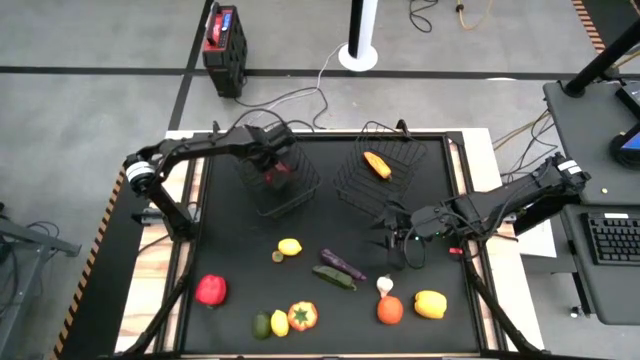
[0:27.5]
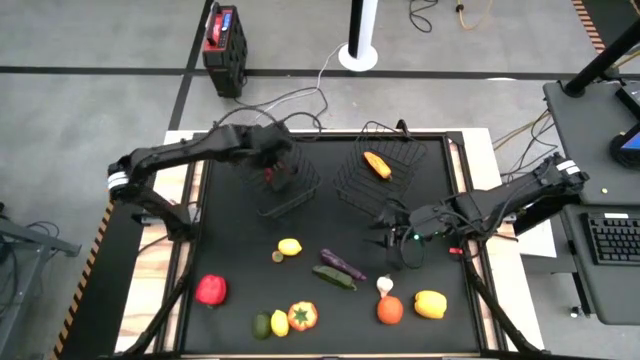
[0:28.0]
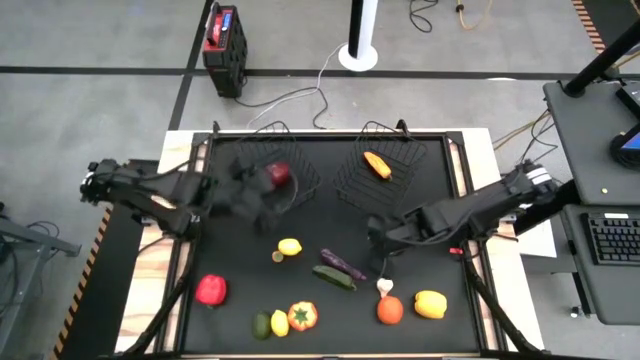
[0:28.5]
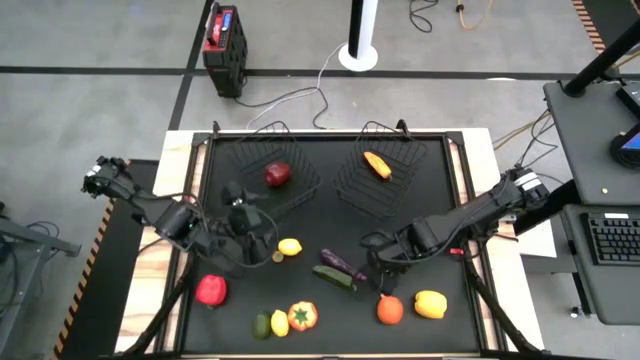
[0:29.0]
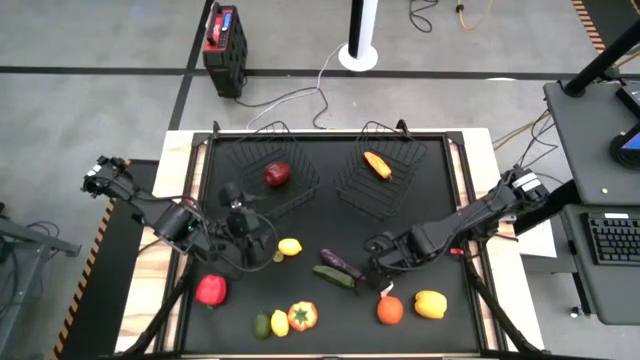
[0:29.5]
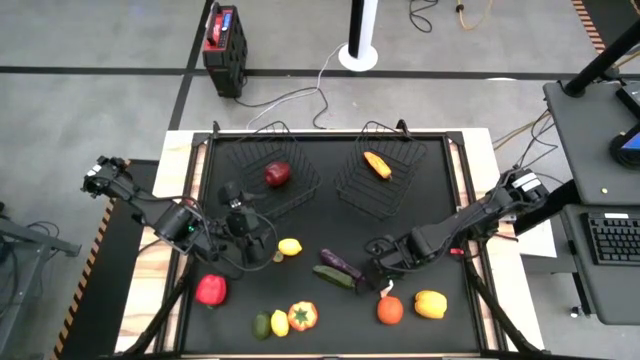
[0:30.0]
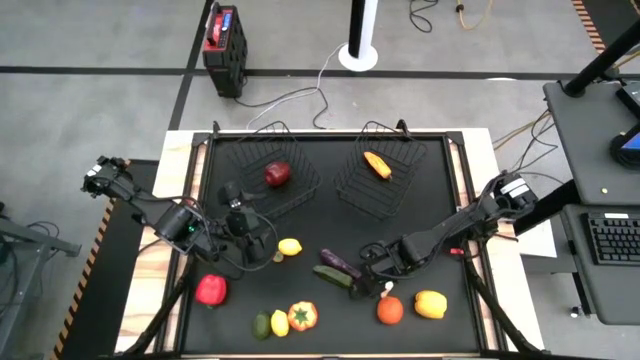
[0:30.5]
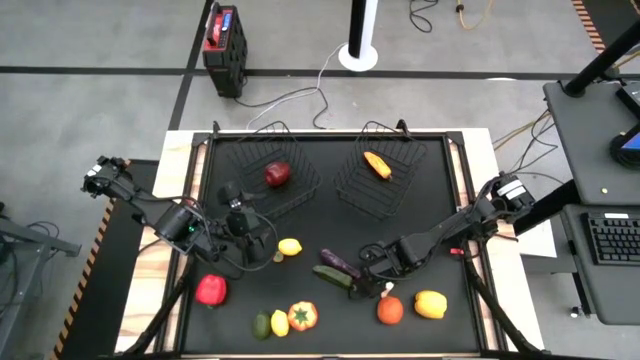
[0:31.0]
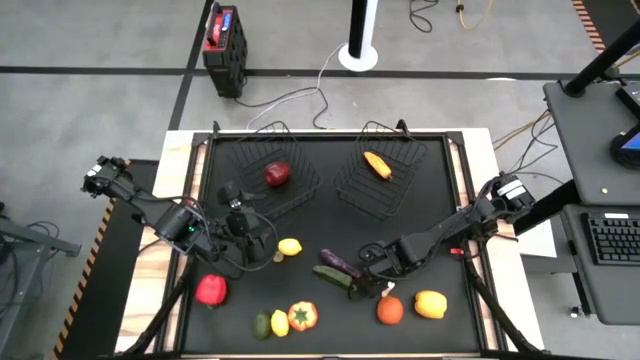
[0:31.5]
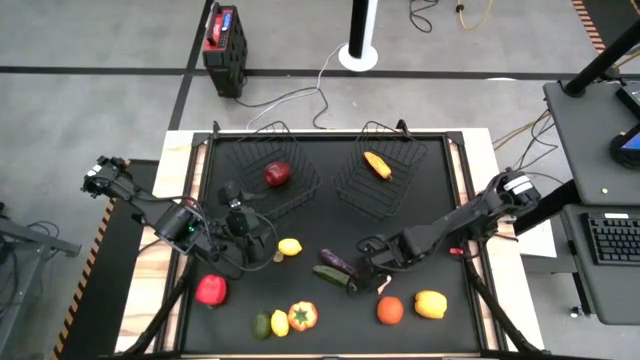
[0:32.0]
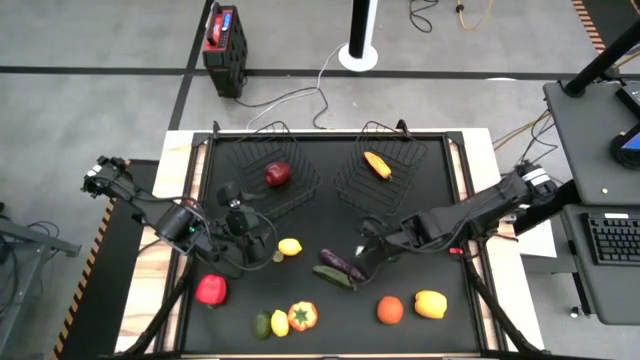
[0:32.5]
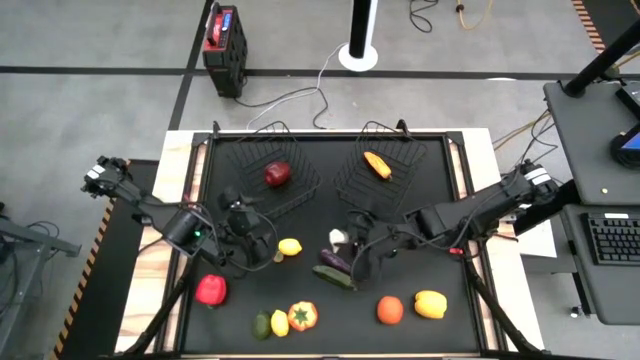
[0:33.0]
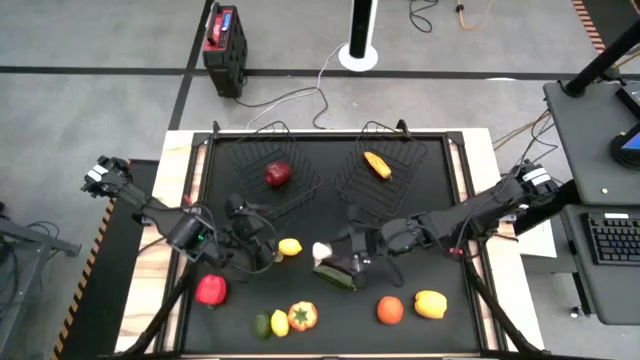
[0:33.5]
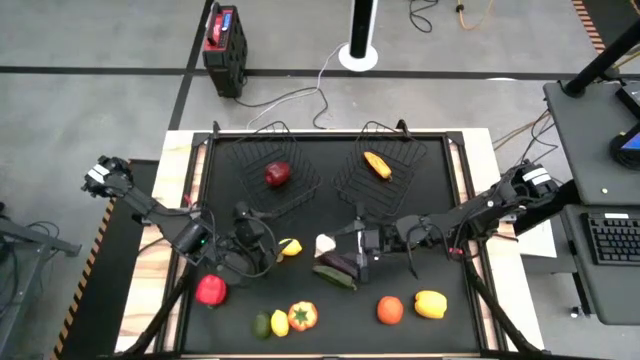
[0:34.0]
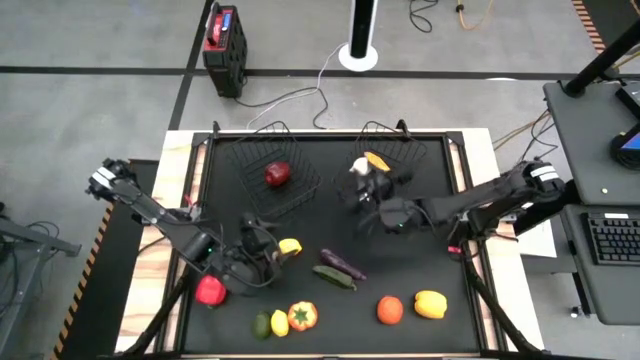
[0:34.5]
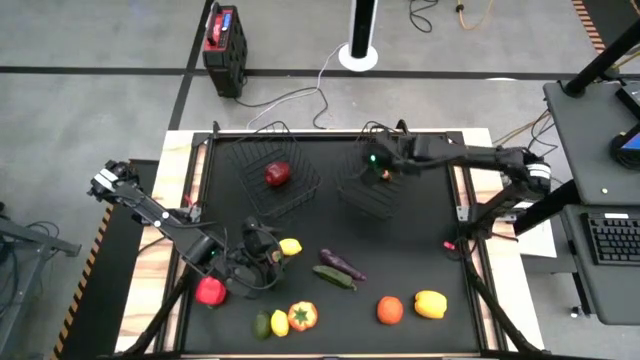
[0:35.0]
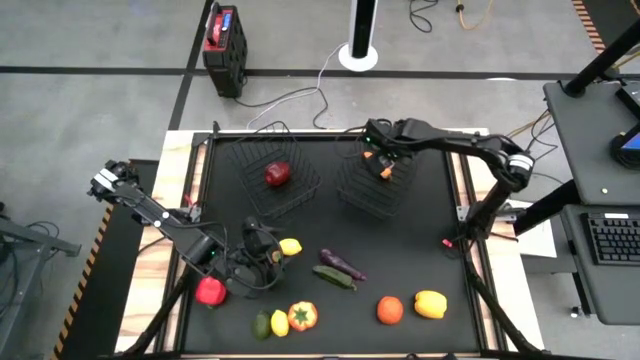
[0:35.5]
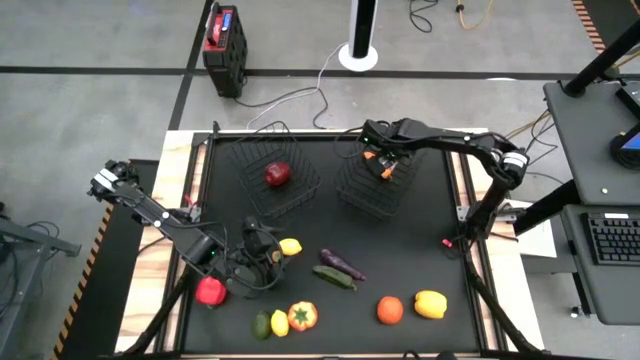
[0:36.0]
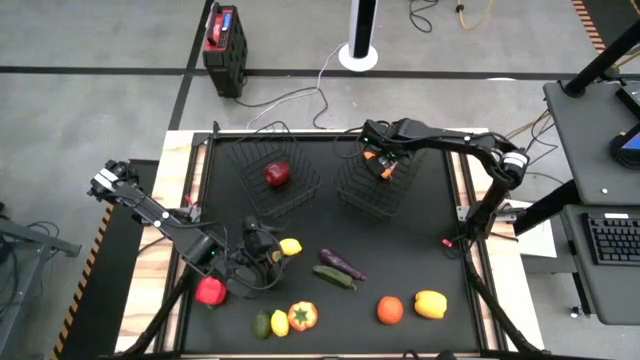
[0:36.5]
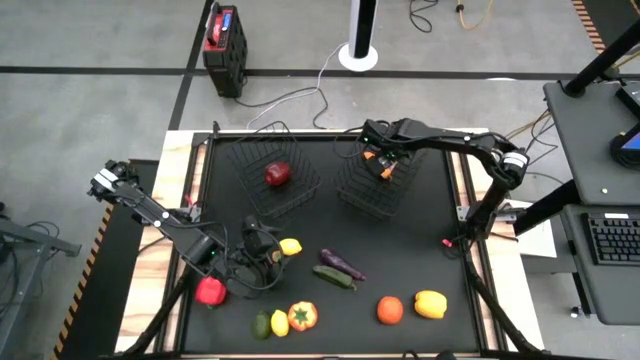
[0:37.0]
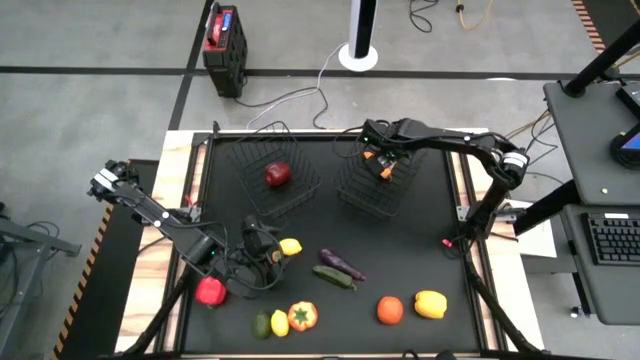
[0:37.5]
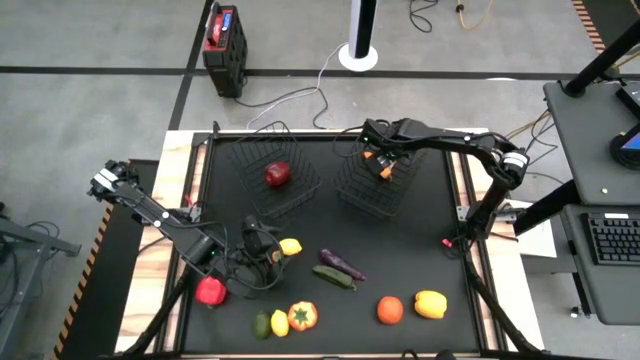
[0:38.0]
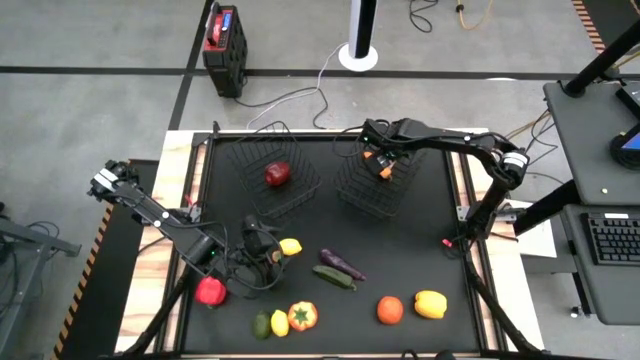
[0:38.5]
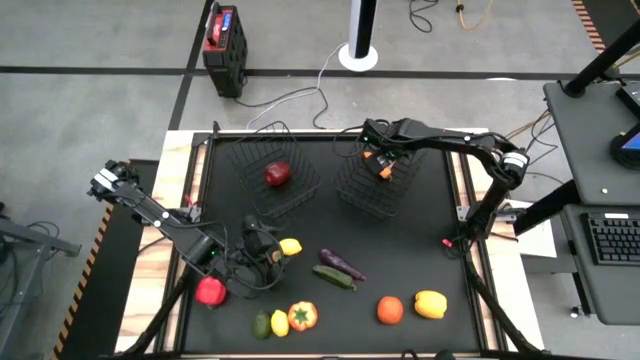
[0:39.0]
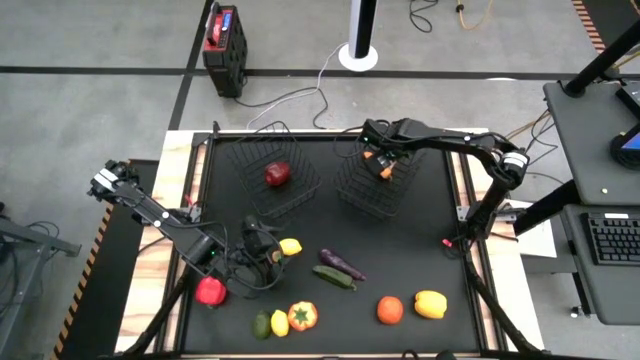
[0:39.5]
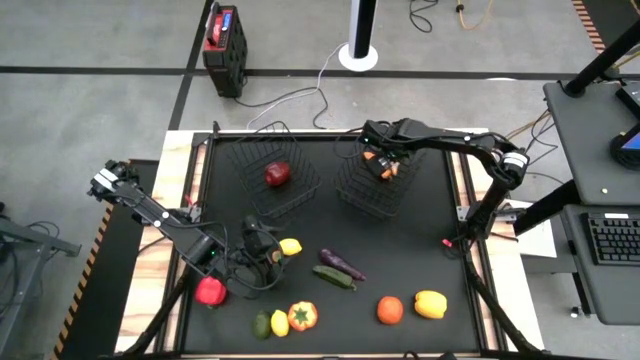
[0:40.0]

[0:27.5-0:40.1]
Task: Sort produce into baskets
Put the garlic into the right black wire basket

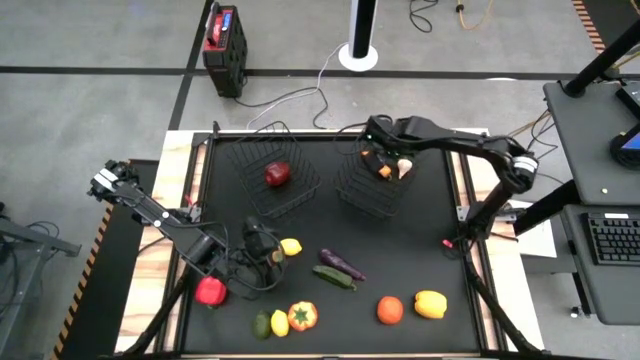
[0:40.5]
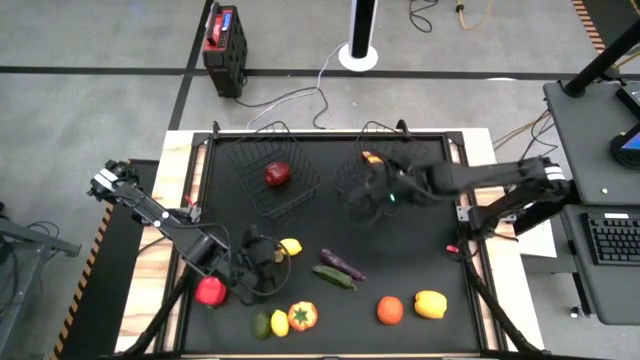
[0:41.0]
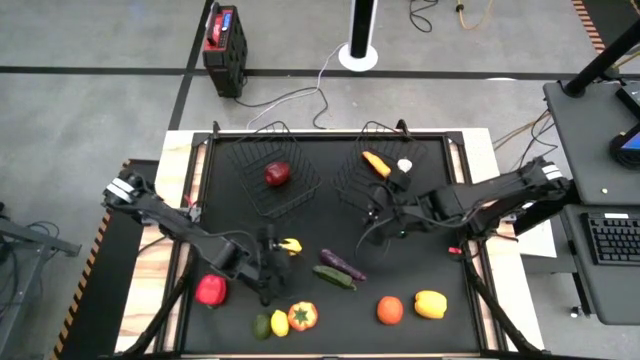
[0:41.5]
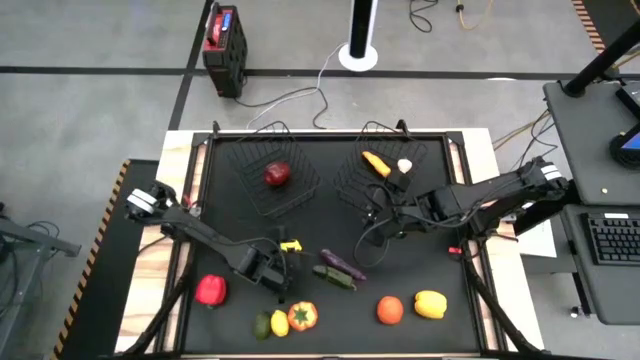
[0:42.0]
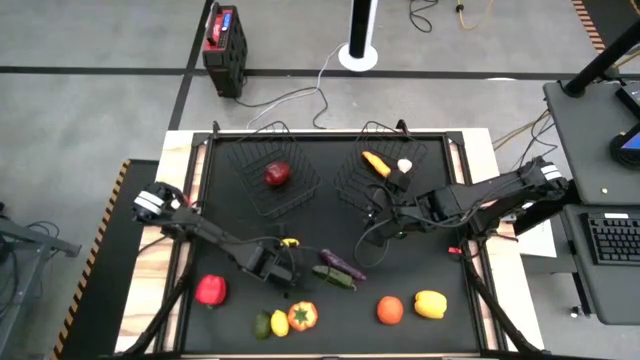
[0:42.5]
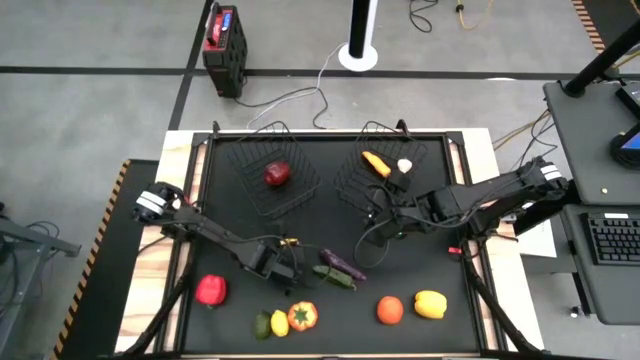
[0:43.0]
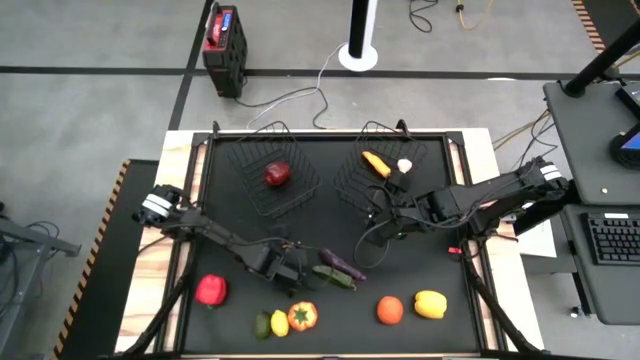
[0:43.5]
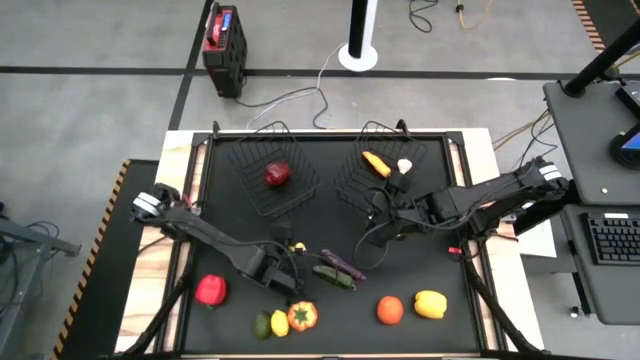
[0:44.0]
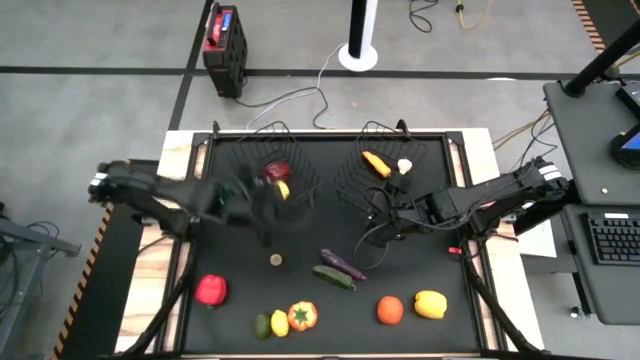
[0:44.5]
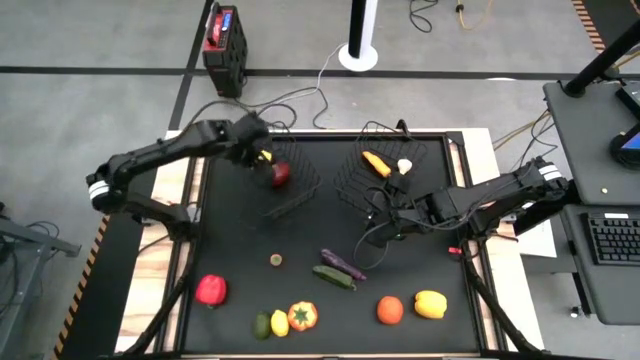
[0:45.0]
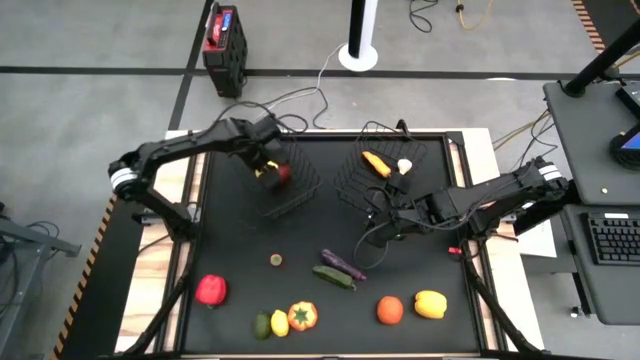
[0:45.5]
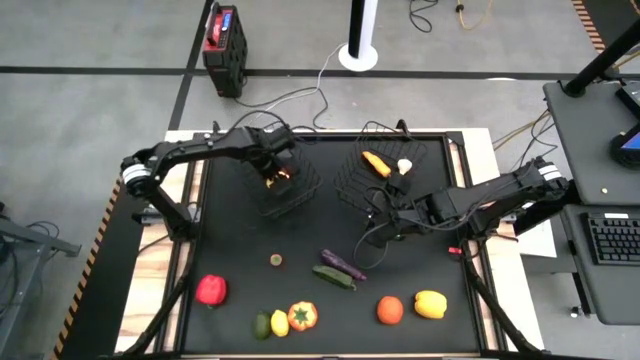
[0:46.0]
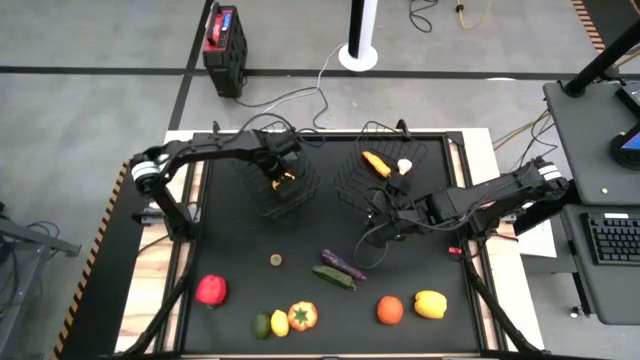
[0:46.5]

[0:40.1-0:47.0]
Put the top lemon into the left black wire basket

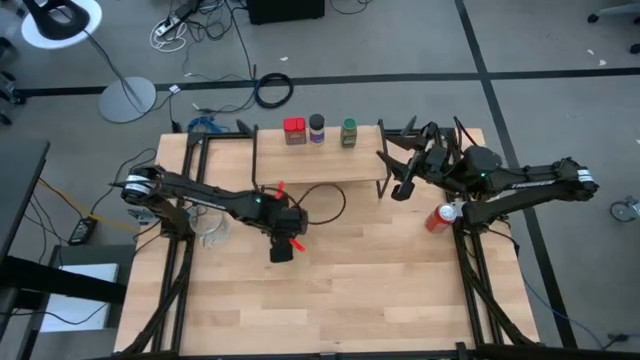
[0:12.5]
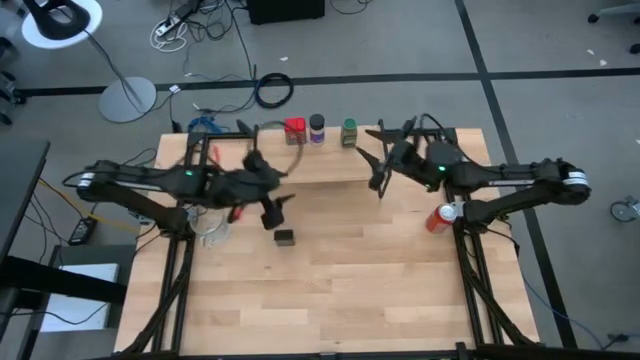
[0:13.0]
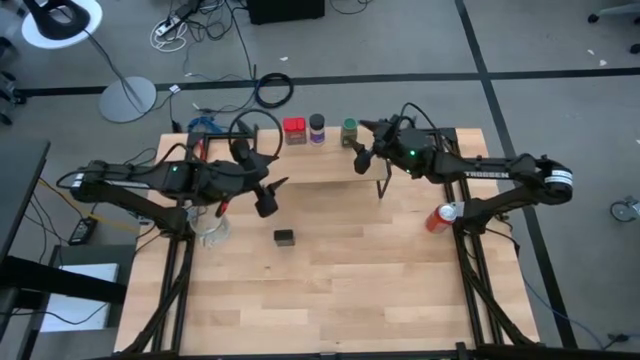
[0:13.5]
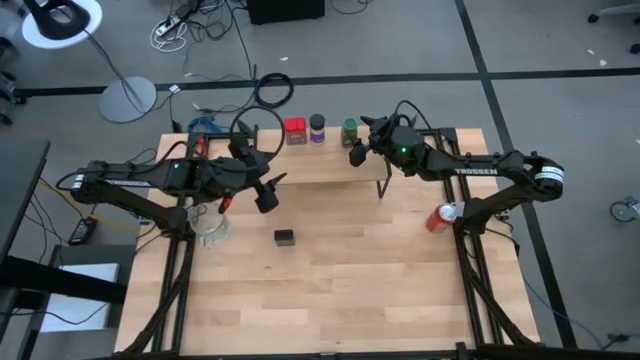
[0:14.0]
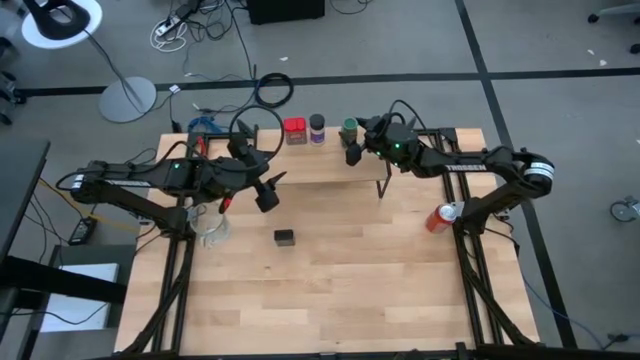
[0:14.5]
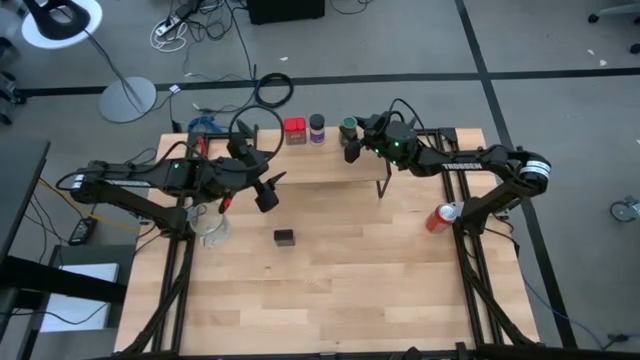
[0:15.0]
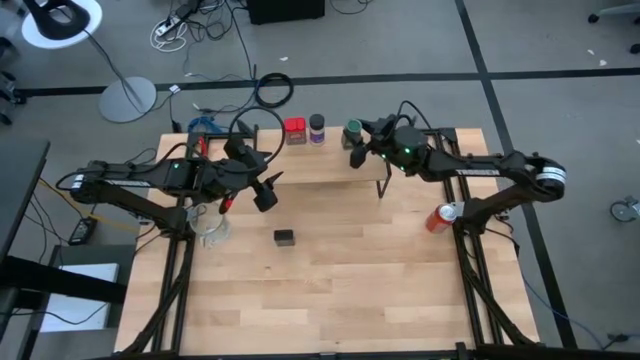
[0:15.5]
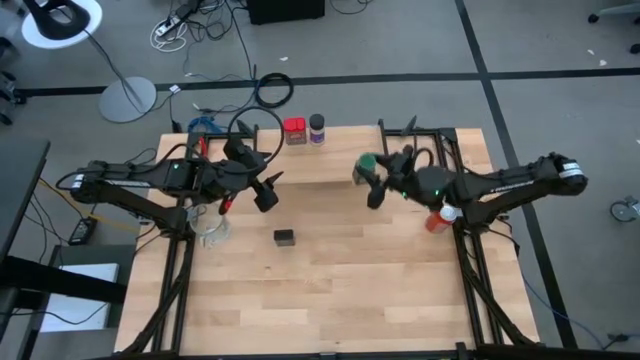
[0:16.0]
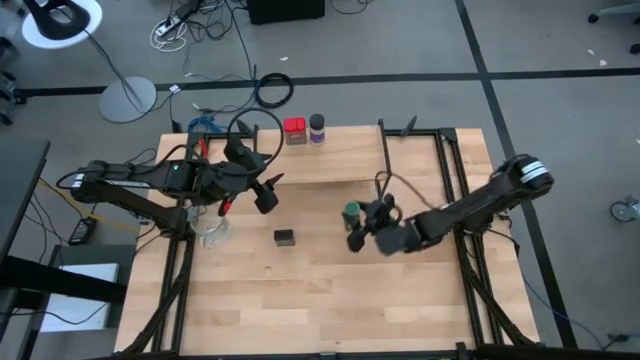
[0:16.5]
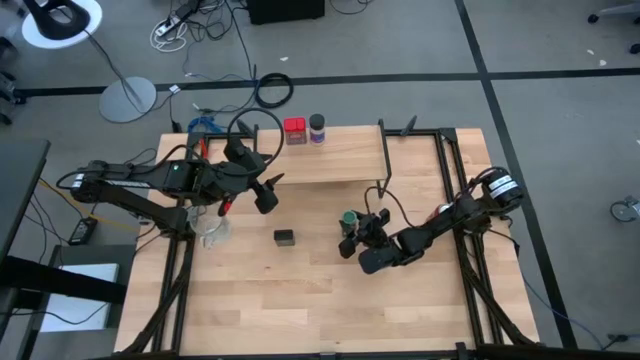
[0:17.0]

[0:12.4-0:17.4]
Task: Shelf spices
Remove the green seasoning bottle from the shelf
